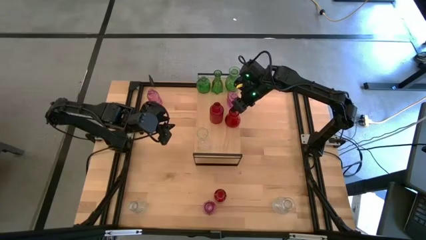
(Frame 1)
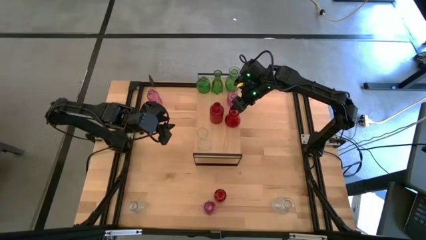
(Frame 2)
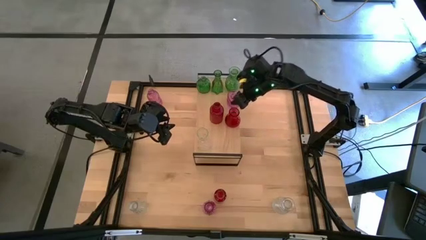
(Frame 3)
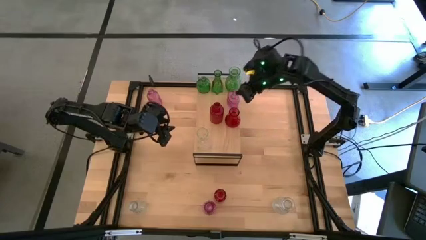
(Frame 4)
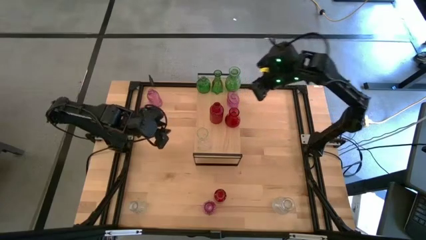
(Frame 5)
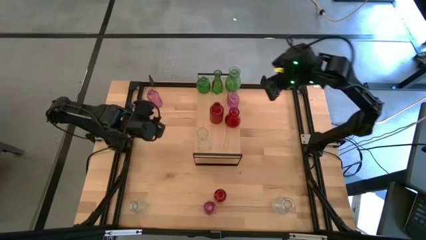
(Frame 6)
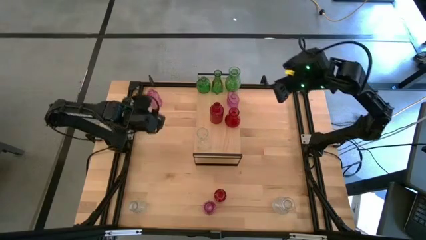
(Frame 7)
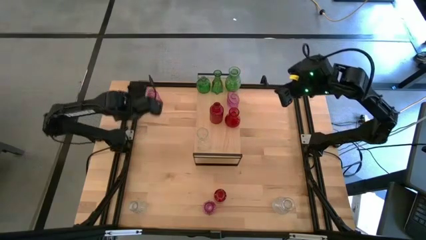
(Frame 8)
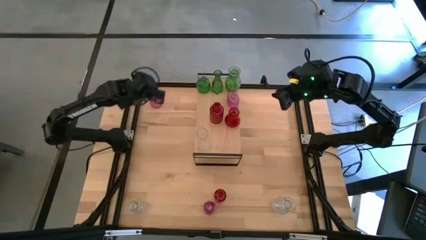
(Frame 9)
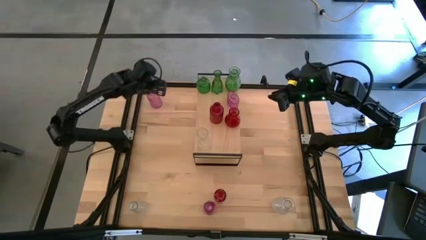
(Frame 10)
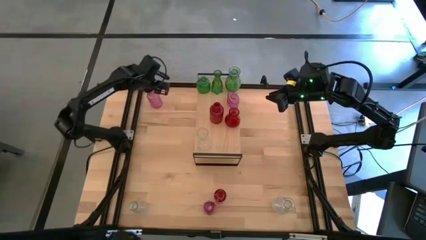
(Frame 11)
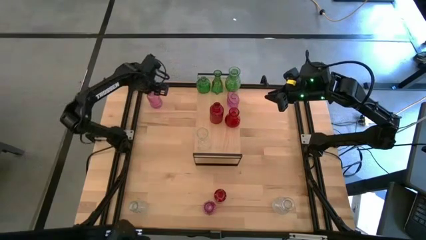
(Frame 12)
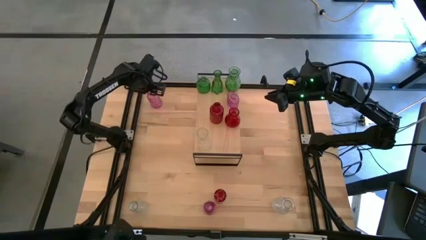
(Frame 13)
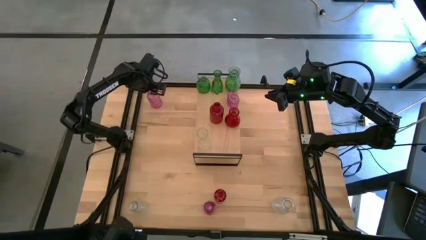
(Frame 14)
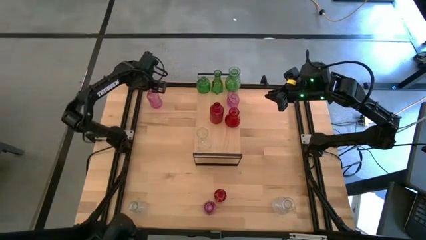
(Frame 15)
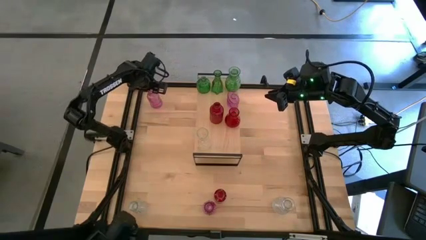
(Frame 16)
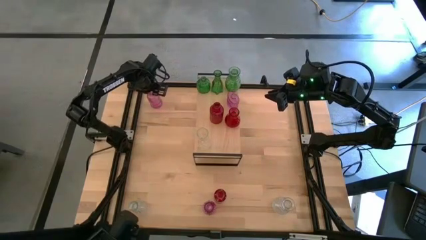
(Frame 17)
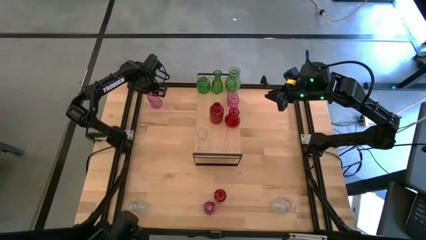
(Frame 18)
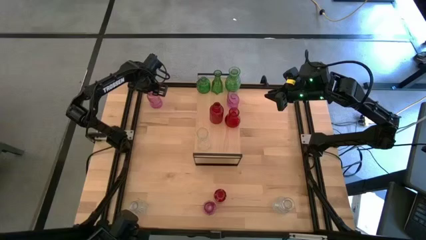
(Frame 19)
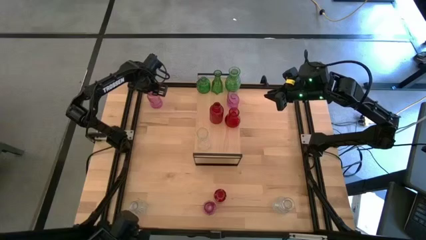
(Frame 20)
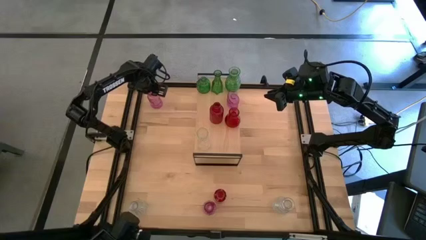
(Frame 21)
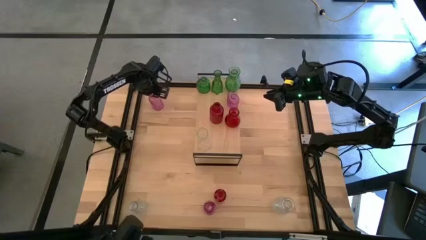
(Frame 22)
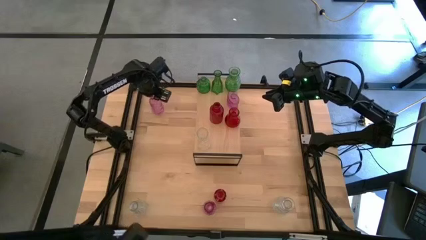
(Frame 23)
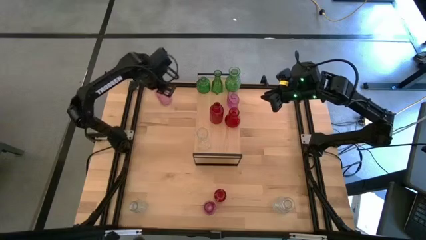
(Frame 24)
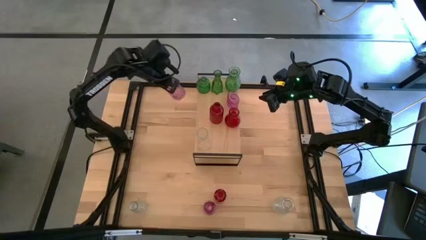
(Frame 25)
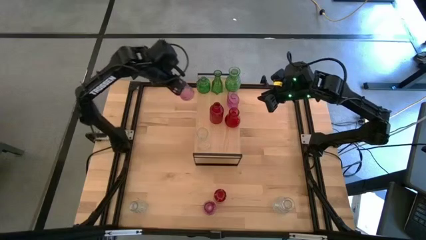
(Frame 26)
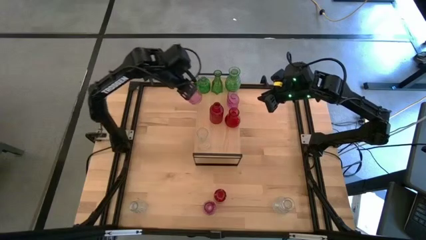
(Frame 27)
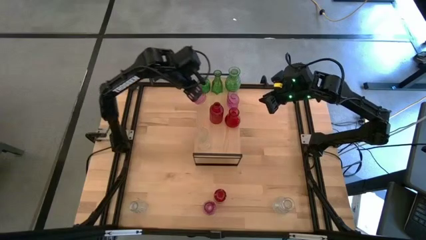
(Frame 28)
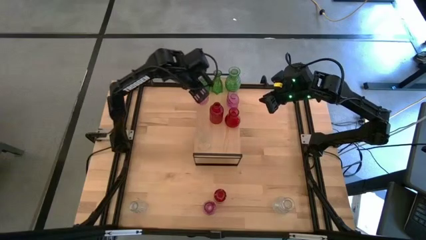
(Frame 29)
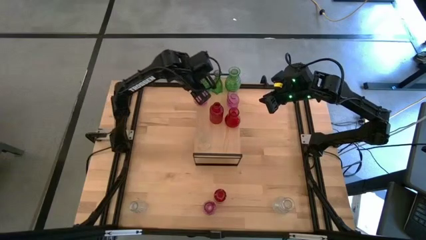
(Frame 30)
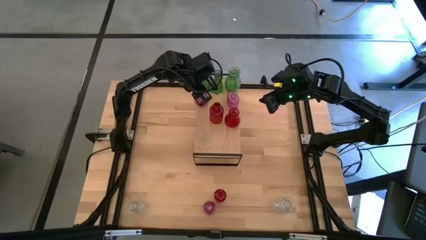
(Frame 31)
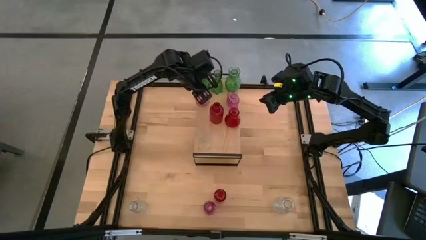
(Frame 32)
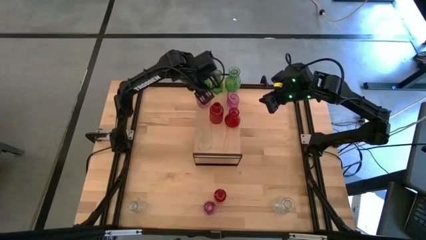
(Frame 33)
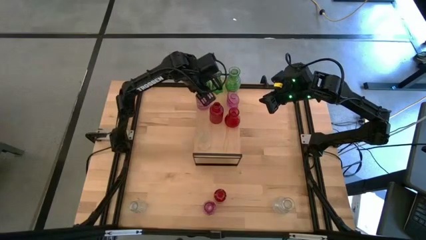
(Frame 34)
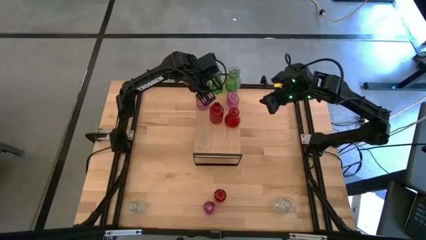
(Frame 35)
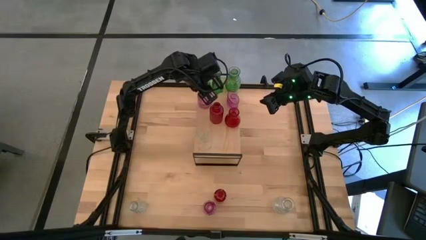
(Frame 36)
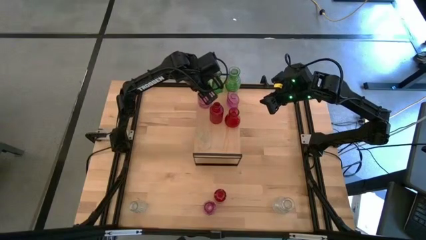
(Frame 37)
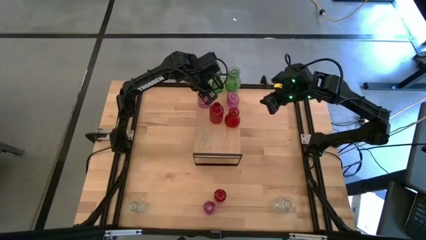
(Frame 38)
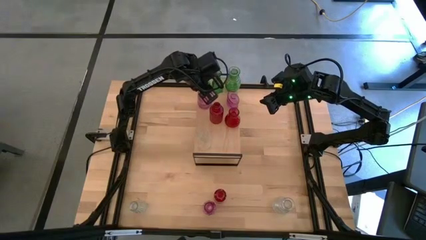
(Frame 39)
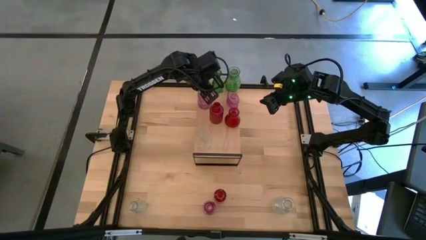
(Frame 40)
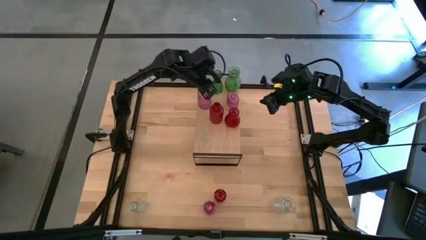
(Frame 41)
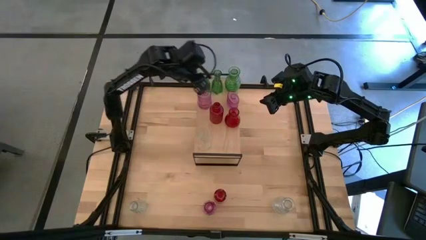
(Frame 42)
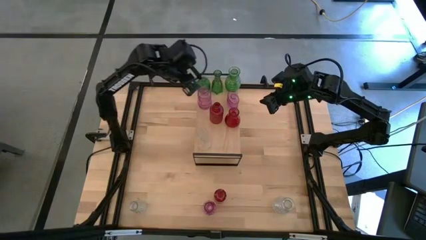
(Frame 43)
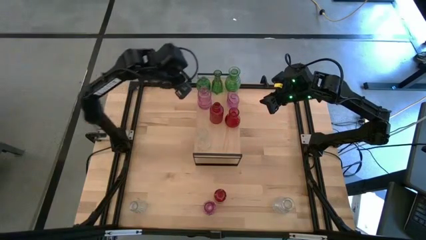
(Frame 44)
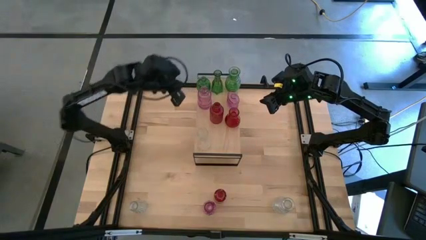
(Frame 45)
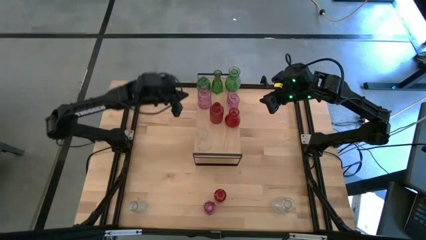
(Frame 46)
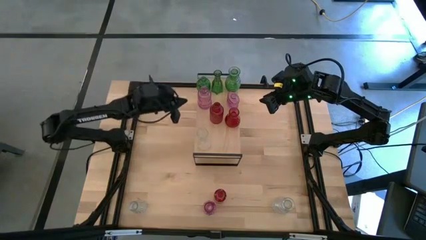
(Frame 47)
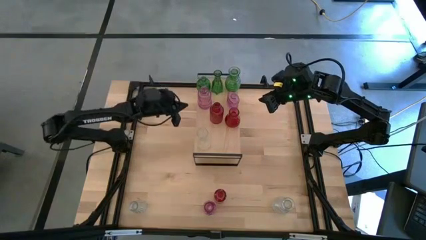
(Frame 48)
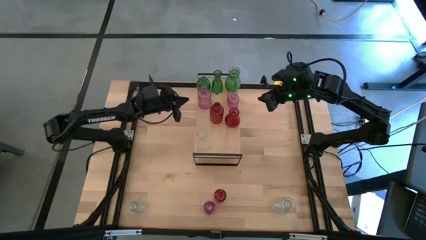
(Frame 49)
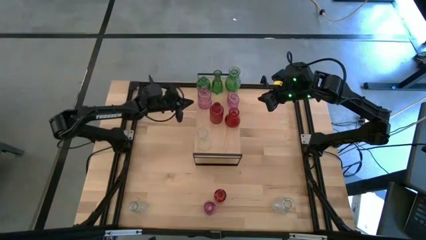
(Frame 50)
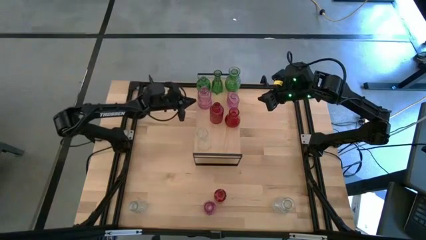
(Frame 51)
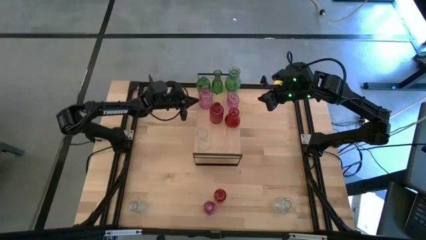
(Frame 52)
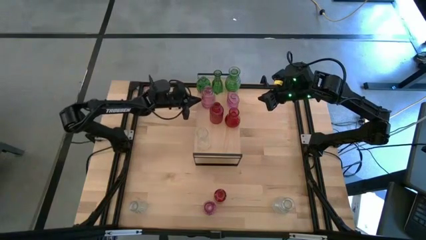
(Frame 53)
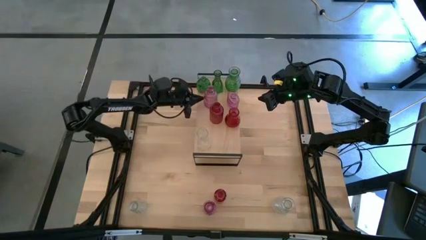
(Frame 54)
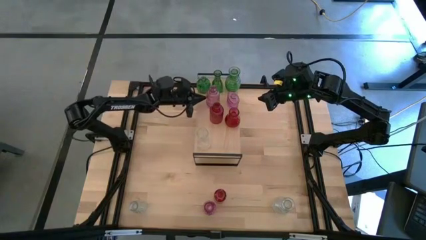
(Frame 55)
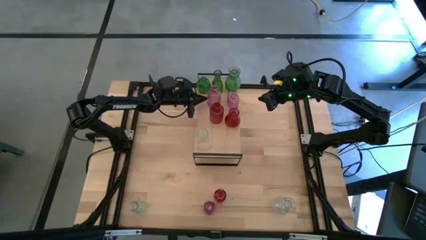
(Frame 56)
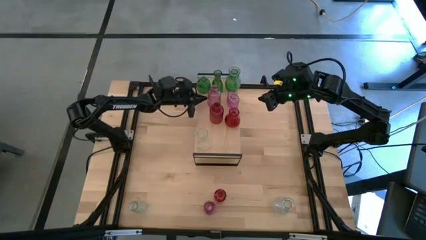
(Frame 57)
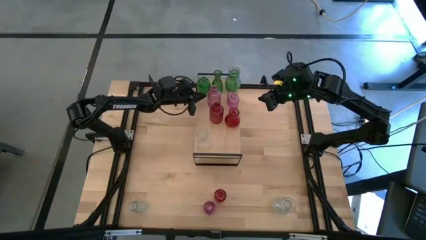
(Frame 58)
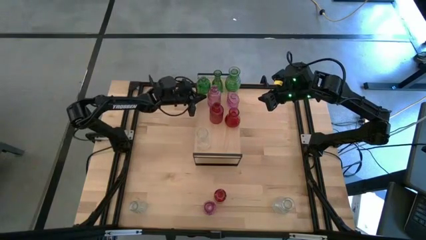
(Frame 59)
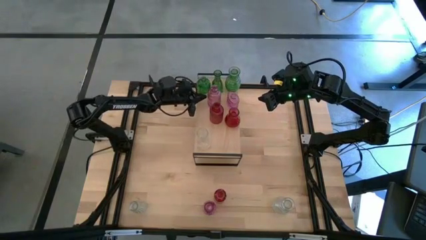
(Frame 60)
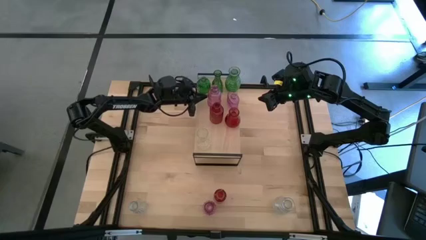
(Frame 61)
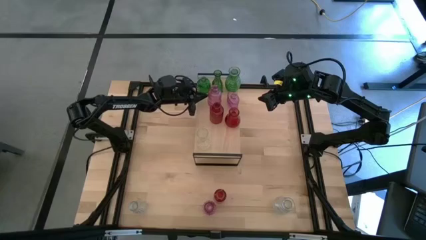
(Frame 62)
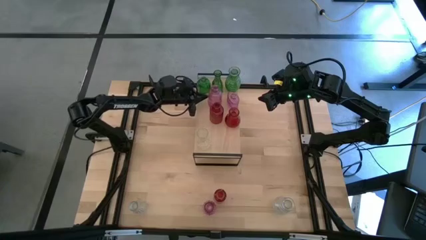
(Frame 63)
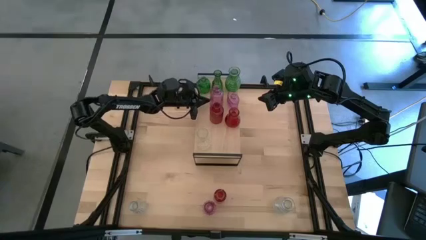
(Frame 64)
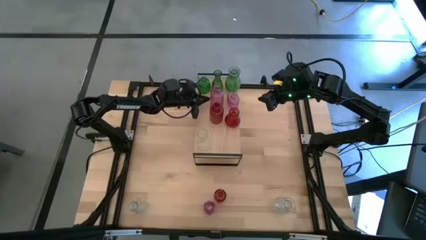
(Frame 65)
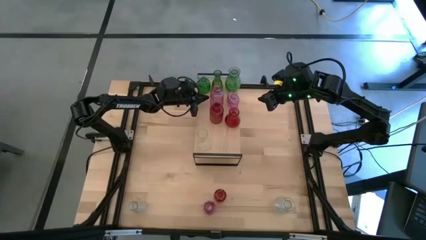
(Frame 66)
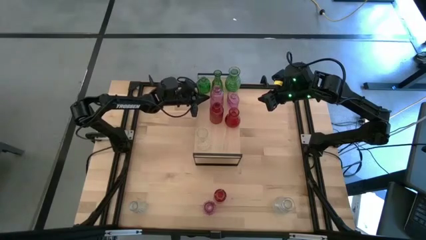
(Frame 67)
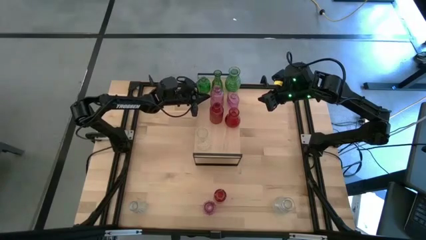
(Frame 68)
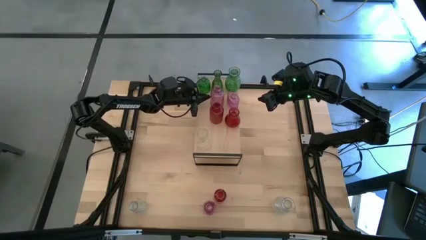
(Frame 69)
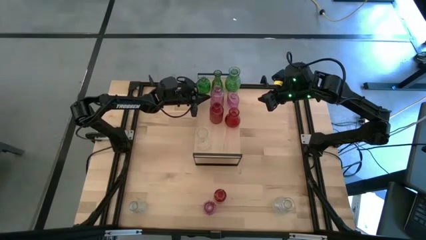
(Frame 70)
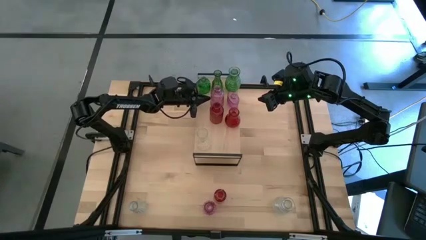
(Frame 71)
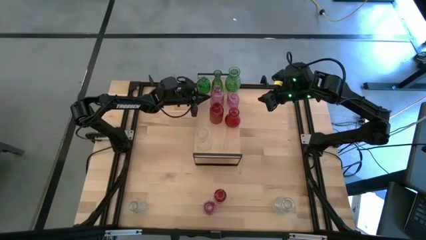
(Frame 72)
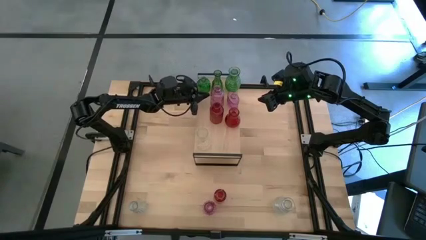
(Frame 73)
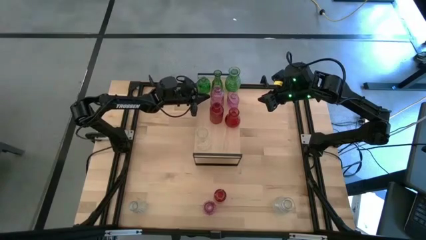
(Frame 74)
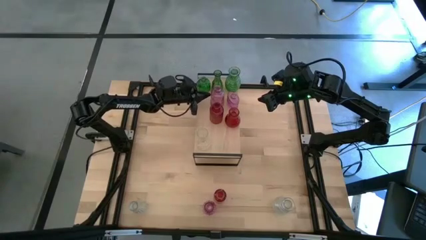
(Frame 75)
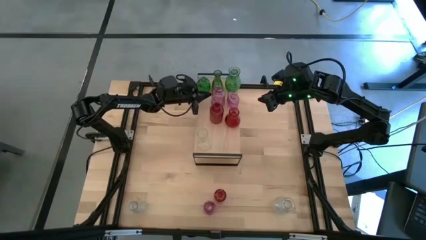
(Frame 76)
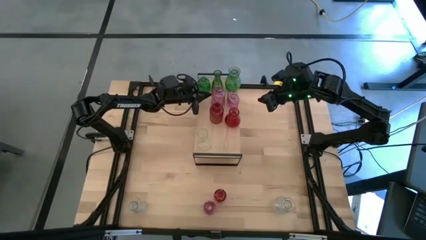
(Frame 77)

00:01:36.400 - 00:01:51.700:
Task: sort vases onto shelf
Put the top pink vase on the shelf aligned with the other pink vase
